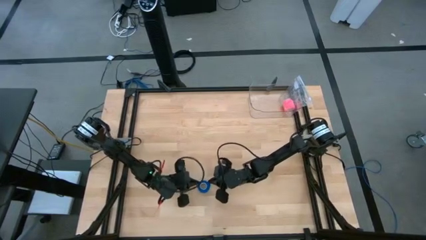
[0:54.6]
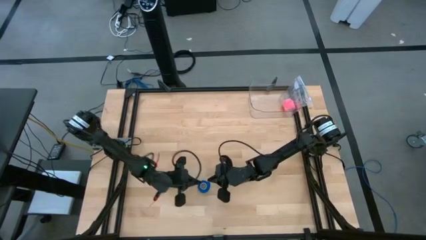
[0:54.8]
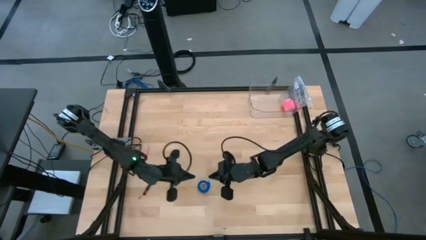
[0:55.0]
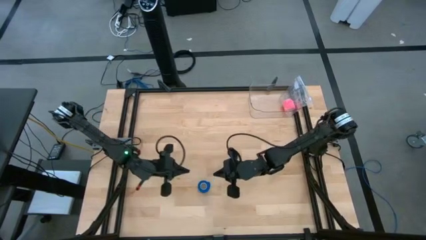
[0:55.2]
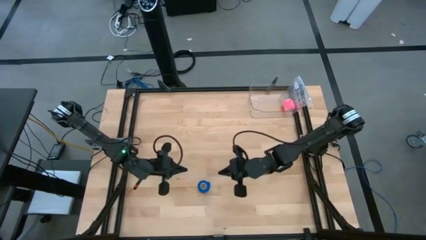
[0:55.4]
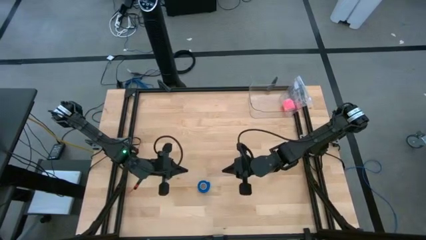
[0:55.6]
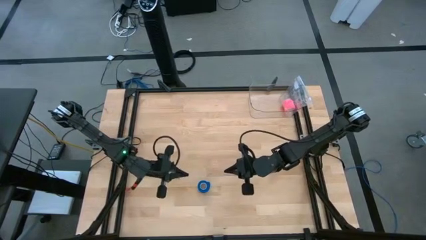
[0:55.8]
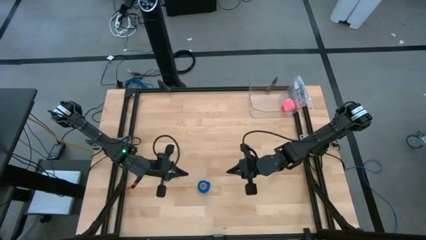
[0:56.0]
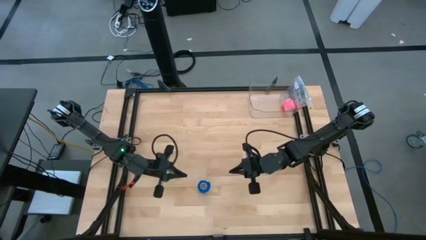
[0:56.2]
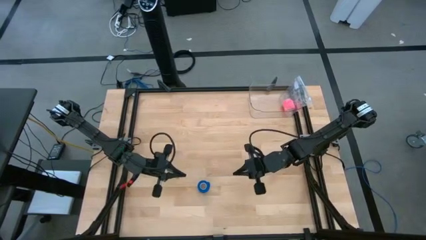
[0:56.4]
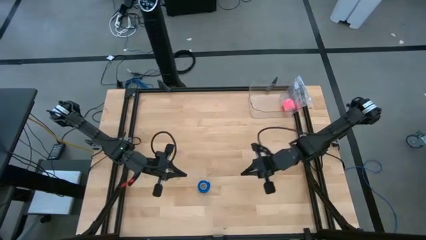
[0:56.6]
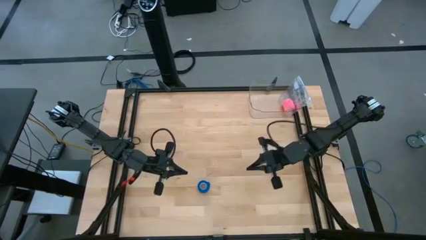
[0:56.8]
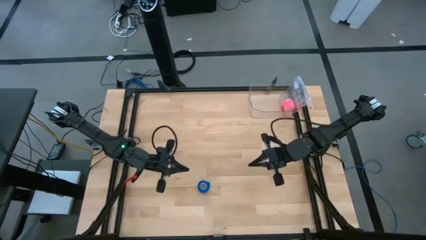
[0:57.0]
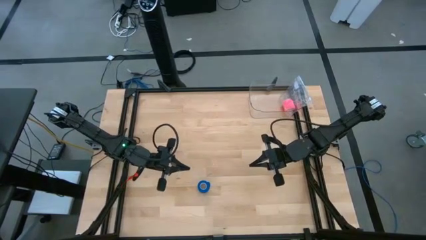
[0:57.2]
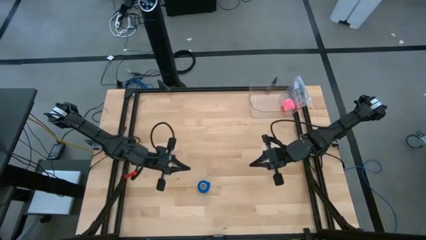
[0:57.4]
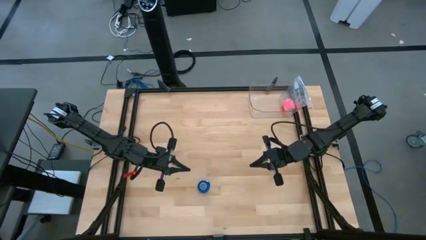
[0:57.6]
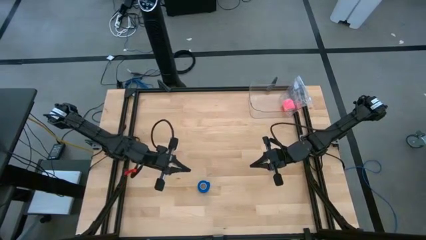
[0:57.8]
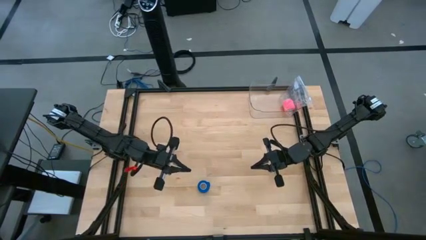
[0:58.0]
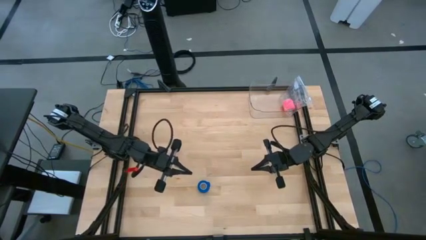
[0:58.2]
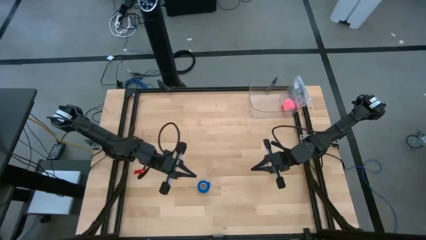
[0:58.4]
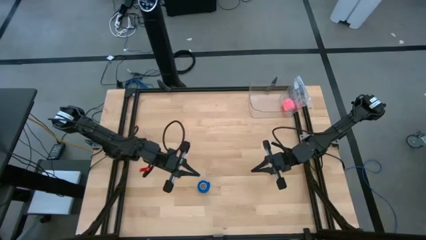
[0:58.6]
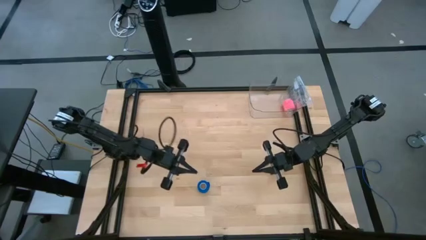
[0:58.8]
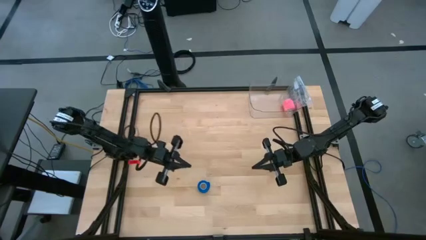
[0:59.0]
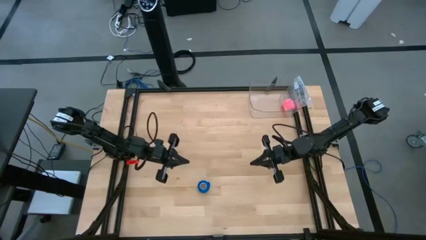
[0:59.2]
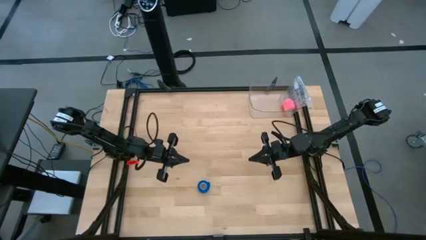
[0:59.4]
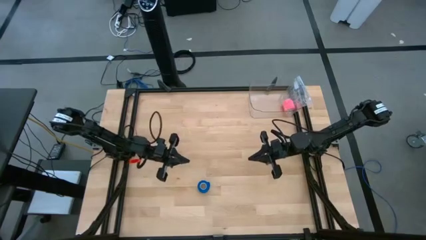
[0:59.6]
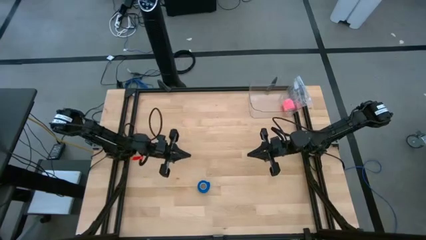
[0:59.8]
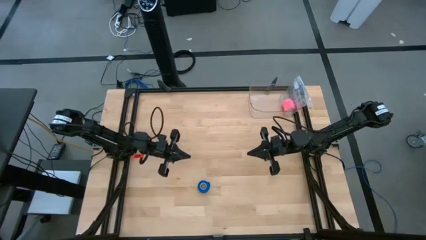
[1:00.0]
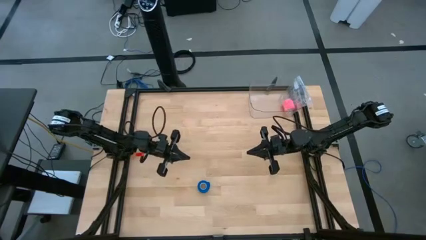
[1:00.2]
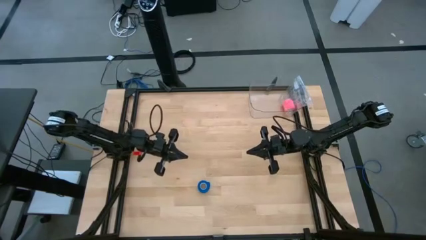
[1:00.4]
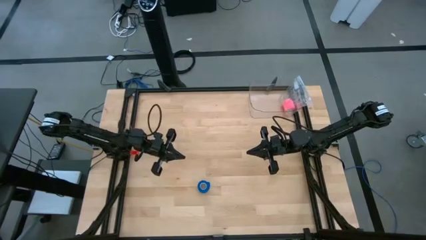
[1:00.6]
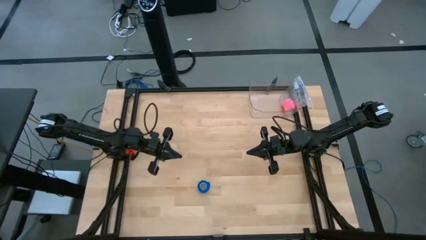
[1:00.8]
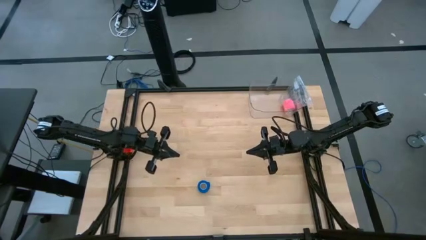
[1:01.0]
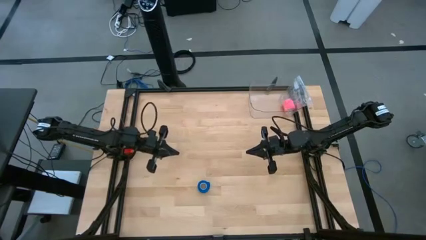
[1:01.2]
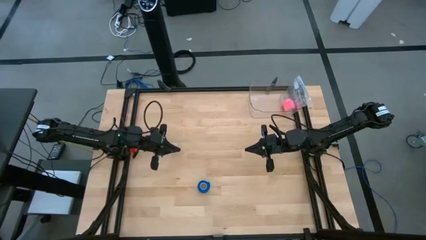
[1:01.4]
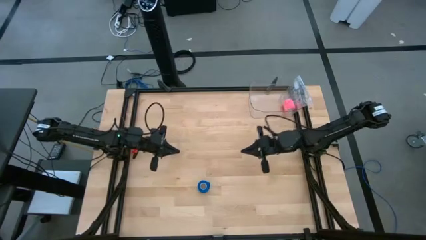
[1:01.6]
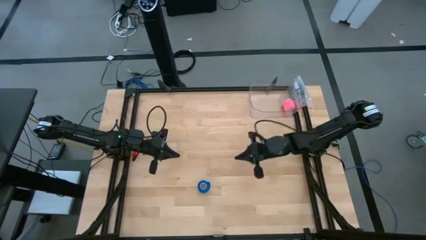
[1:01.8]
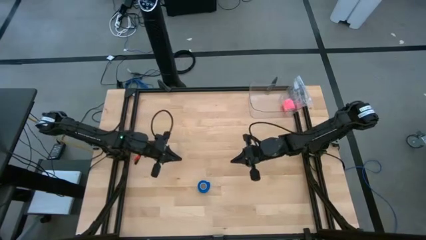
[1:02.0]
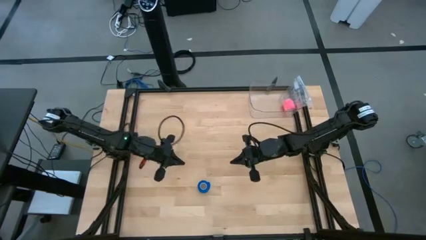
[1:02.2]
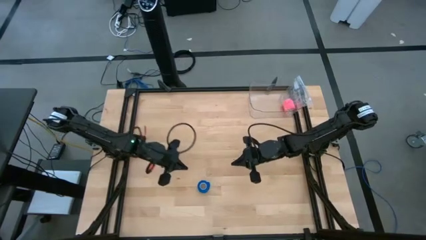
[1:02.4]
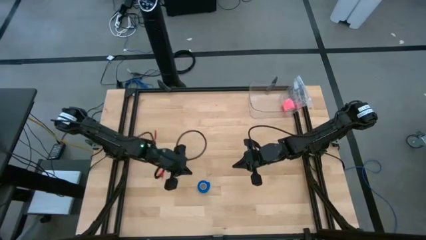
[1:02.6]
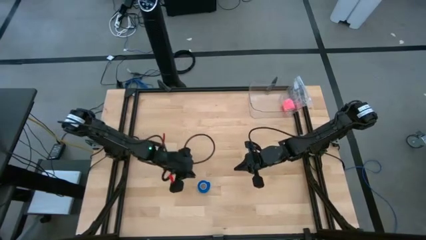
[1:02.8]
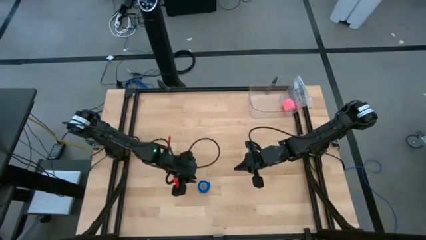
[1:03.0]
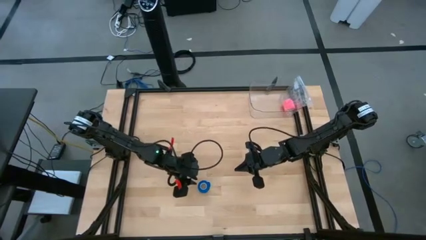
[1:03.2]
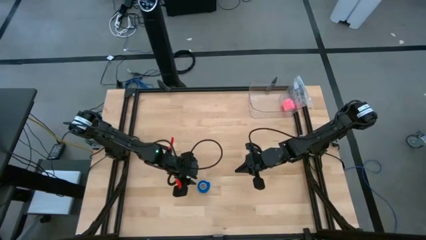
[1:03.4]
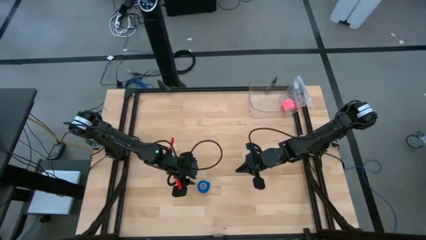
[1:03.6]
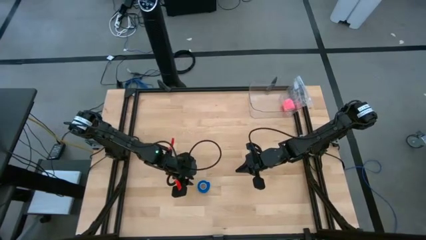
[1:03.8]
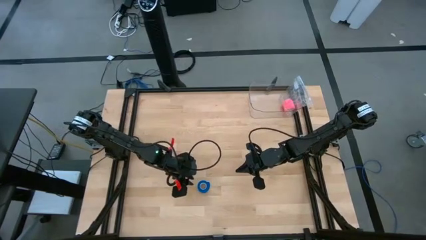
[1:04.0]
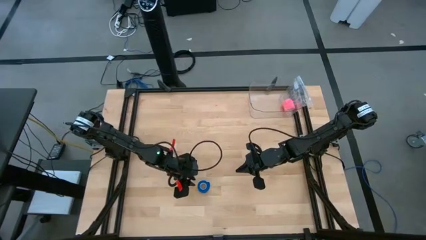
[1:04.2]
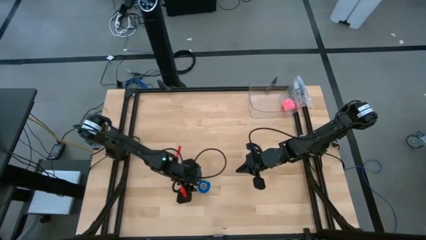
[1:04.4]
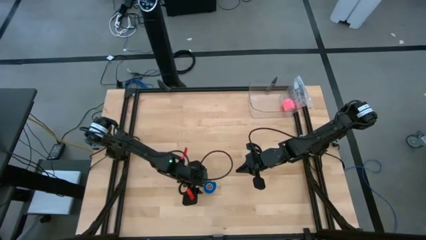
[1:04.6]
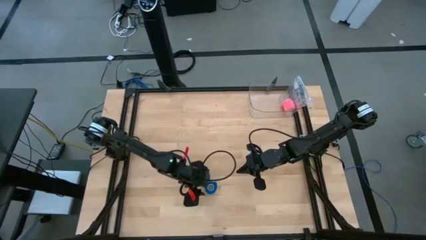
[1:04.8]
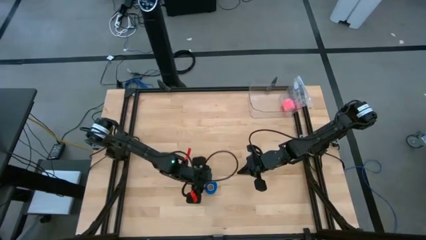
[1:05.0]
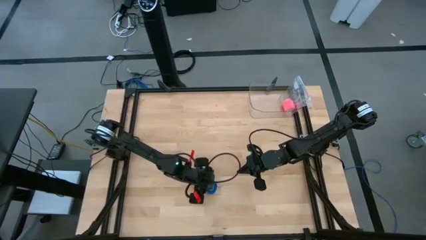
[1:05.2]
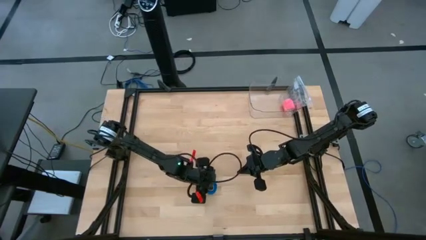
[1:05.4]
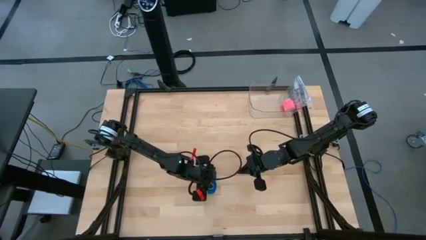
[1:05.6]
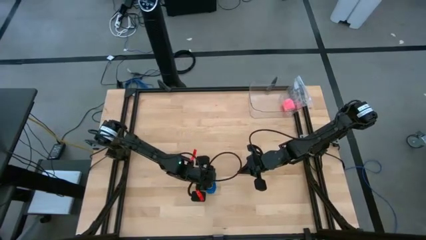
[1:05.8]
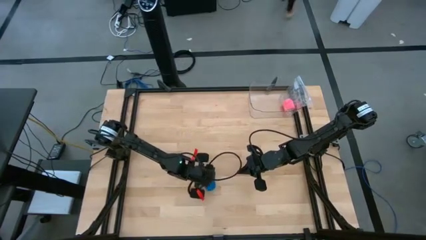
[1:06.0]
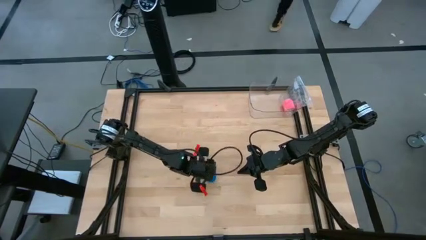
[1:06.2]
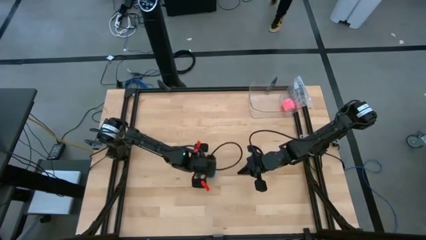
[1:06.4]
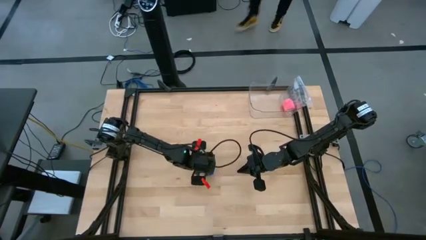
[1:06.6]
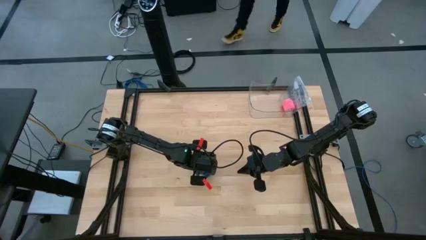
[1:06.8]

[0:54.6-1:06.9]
Task: Roll bandage
Move the blue bandage to the top

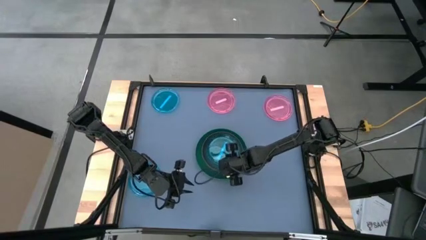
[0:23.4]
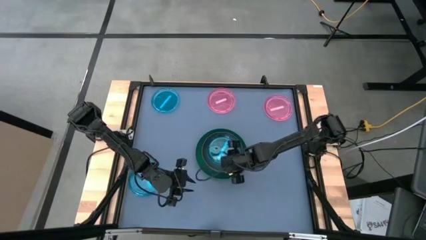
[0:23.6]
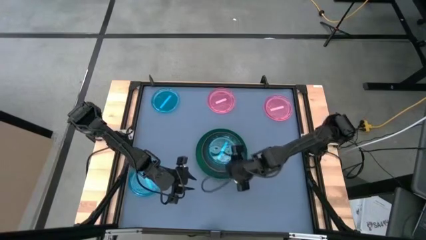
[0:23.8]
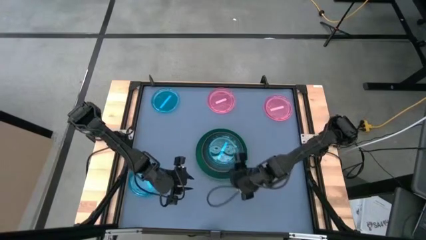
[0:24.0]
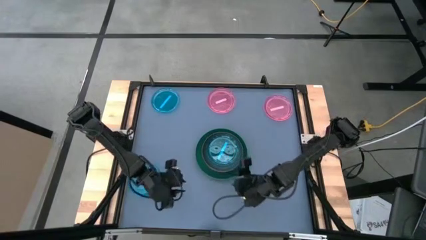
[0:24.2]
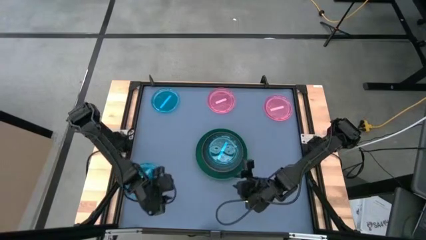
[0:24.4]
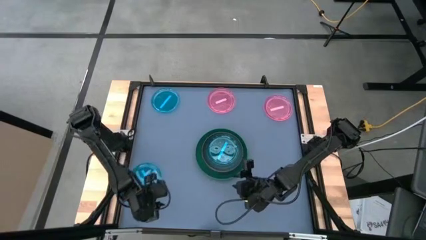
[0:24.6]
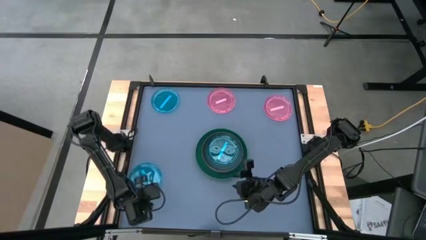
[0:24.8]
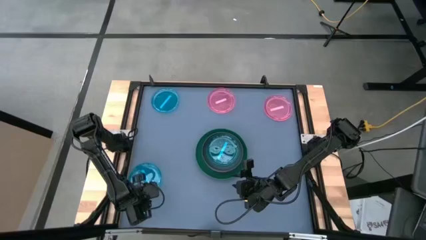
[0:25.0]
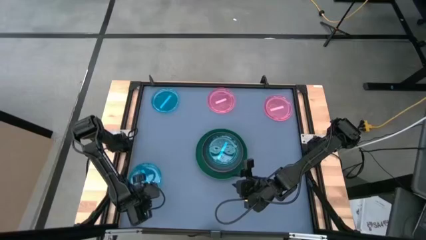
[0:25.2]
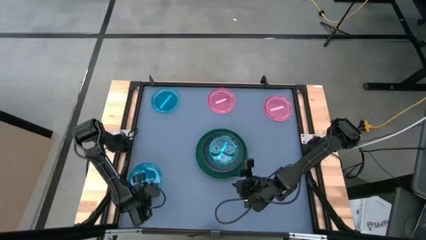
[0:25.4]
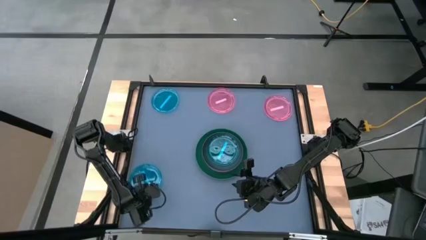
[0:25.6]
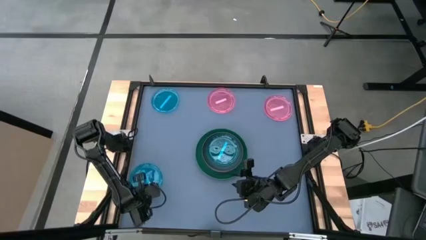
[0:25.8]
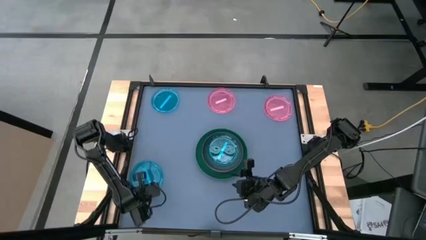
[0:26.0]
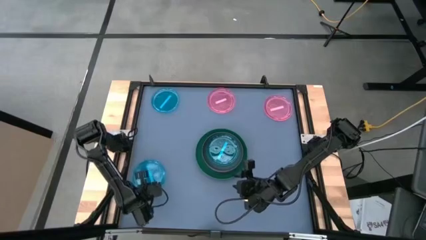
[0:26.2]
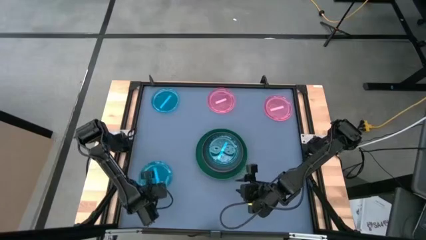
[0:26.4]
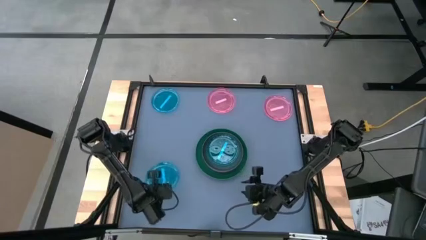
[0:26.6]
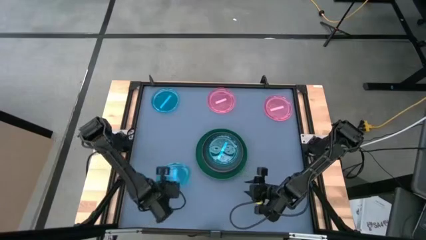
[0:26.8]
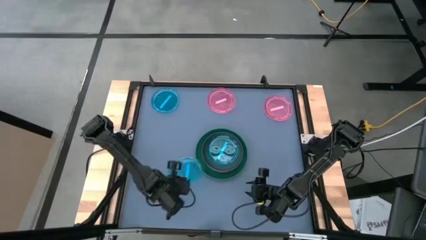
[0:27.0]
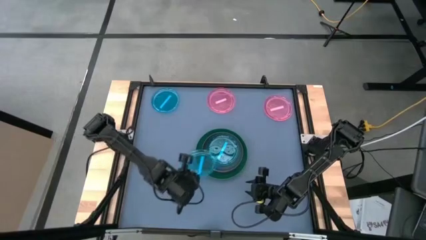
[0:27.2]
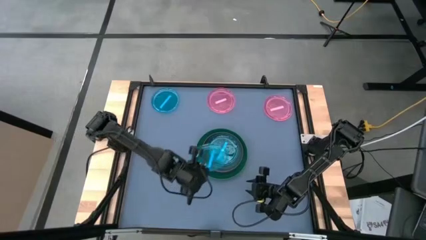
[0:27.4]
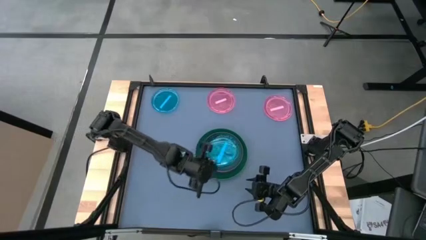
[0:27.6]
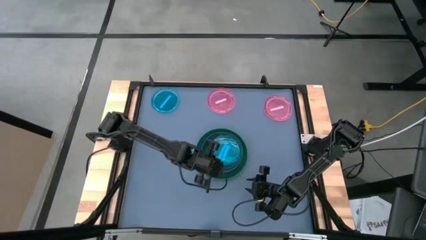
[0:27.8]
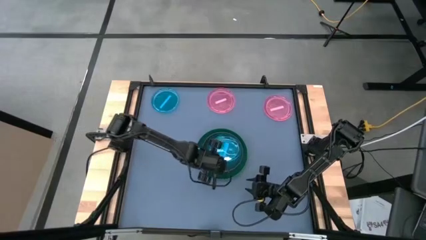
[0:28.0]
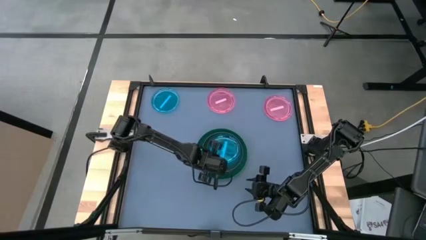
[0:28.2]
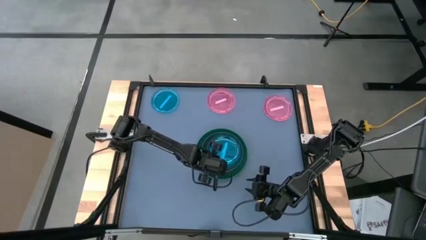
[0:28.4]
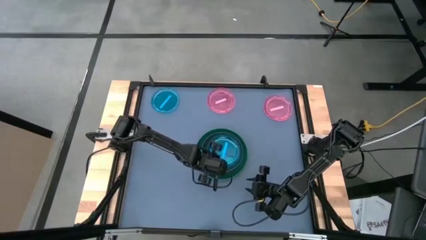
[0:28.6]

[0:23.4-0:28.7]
Task: Stack plastic plates
Stack the bottom blue plate on top of the blue plate
